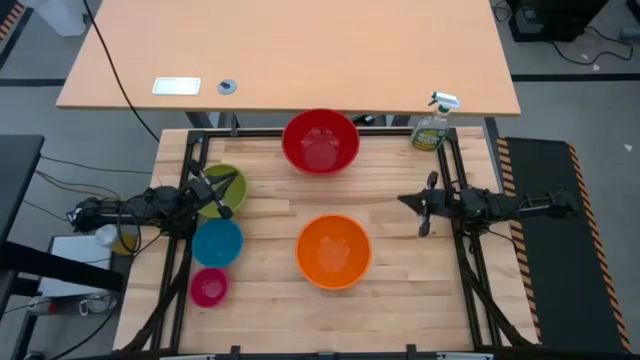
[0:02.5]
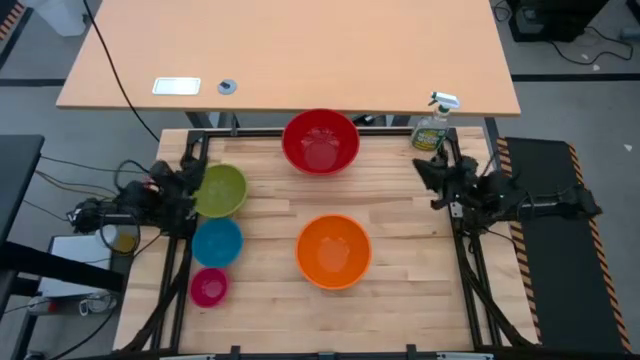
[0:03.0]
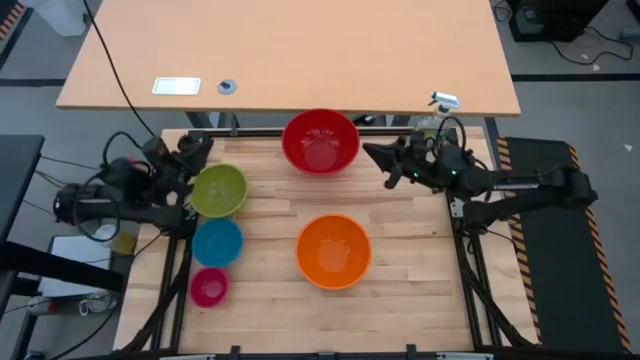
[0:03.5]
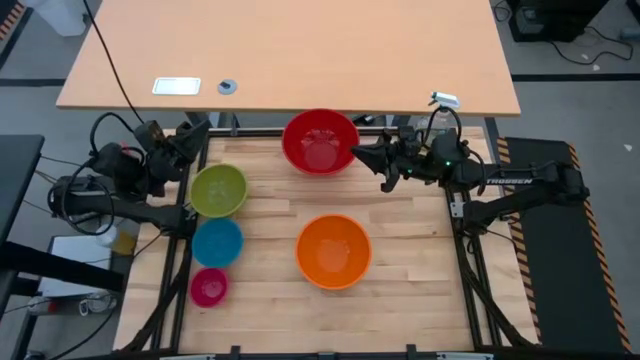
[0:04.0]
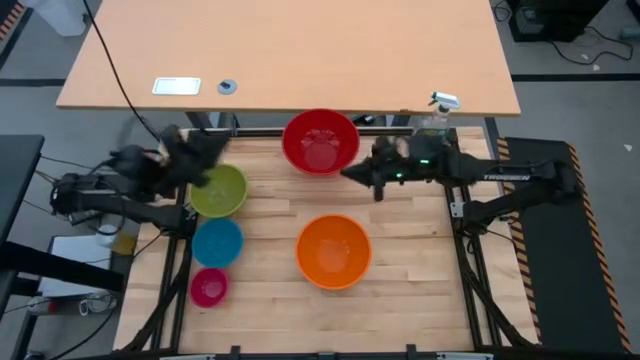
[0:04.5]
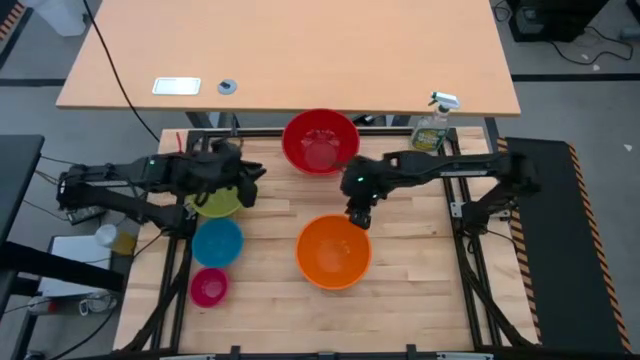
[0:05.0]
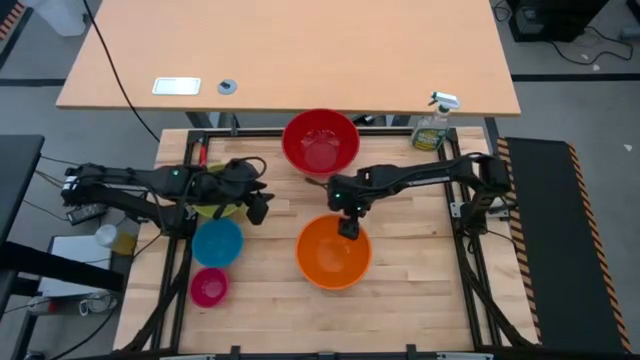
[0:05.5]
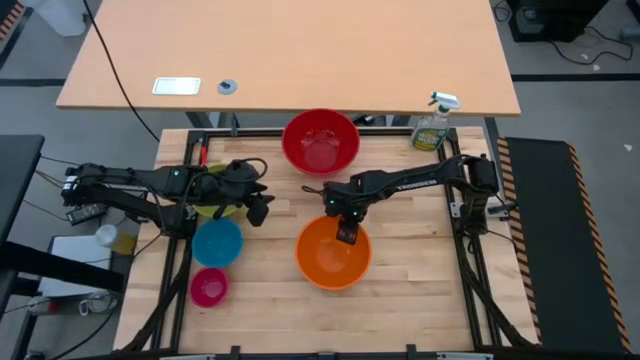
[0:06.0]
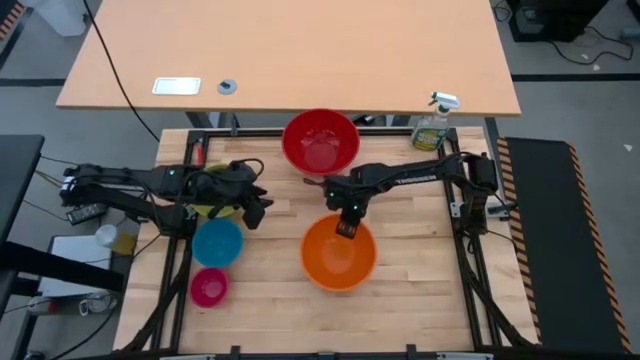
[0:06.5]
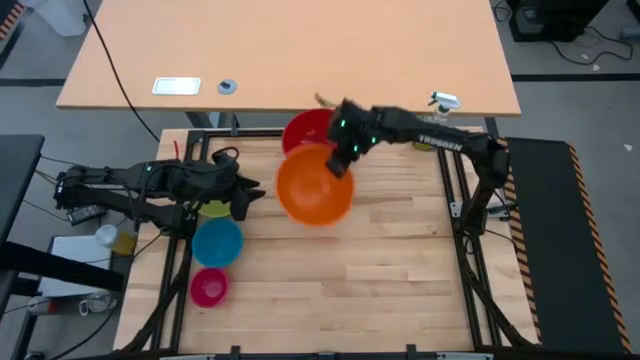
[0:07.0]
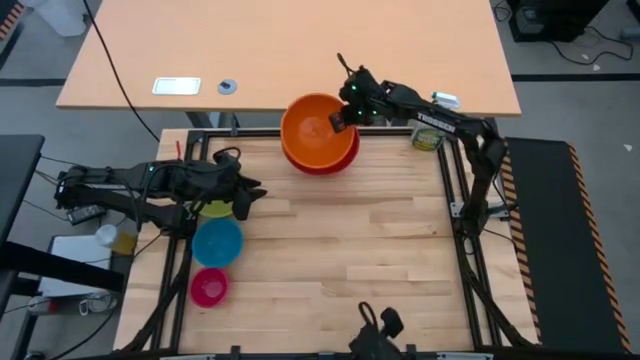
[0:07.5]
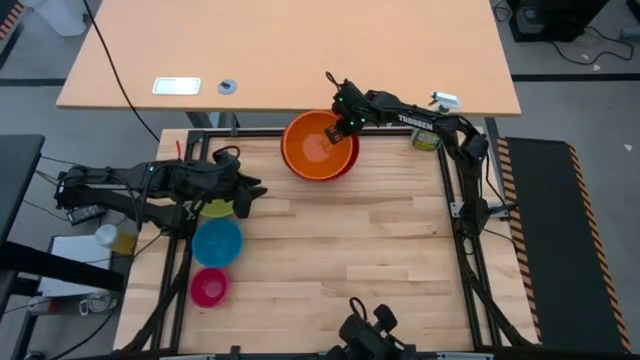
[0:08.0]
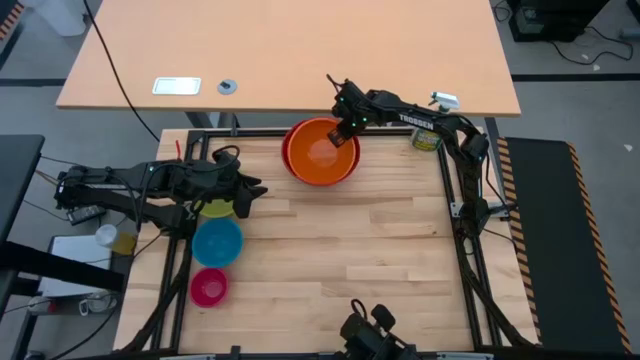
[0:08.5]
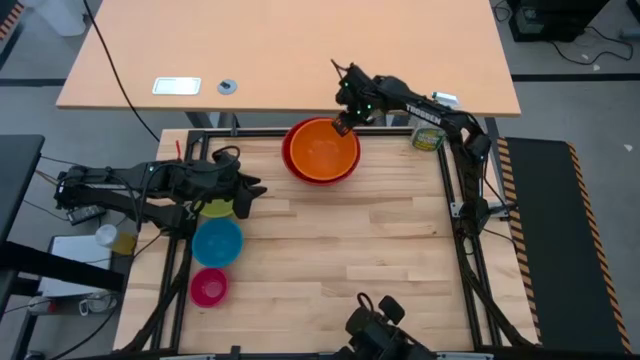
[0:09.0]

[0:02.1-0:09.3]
Stack the orange bowl on top of the red bowl

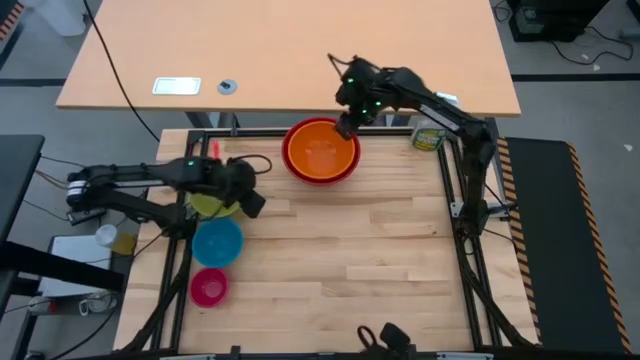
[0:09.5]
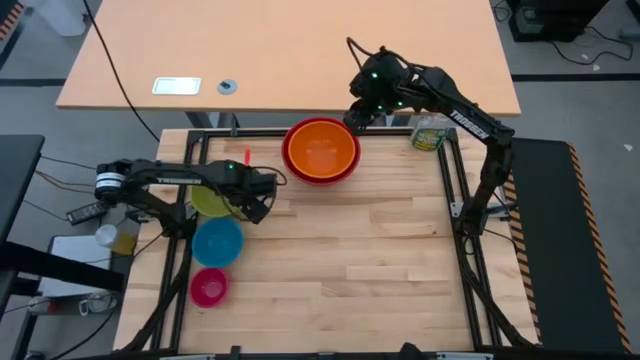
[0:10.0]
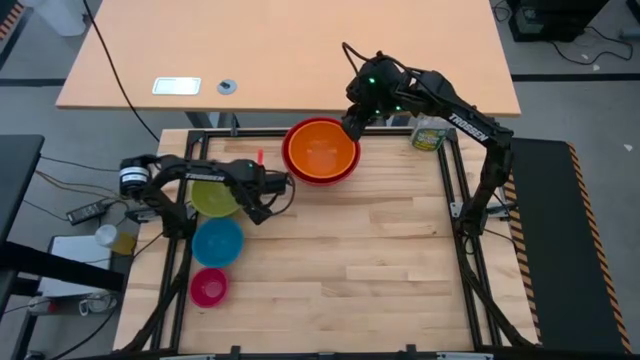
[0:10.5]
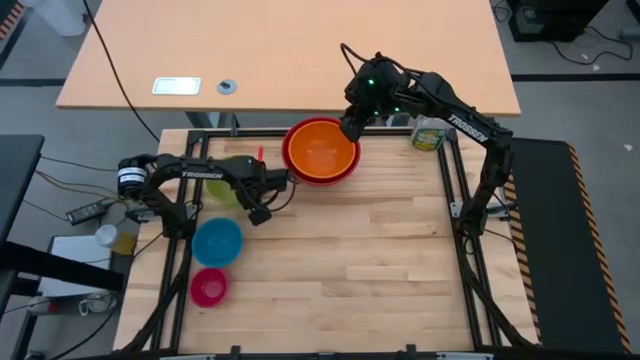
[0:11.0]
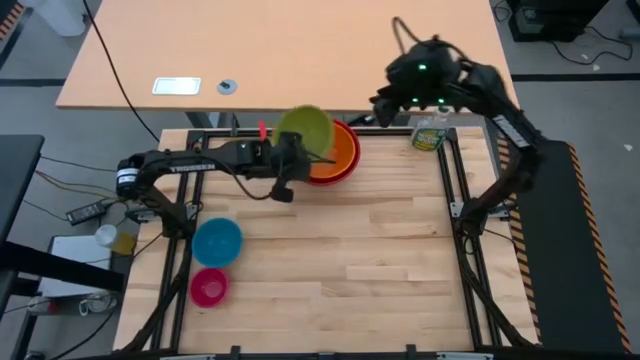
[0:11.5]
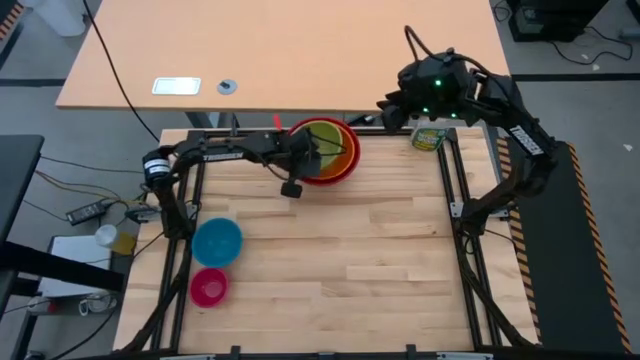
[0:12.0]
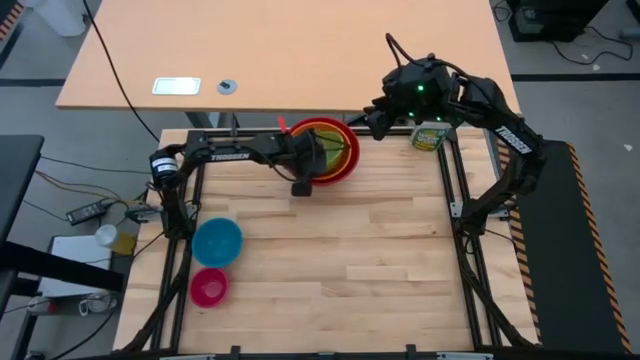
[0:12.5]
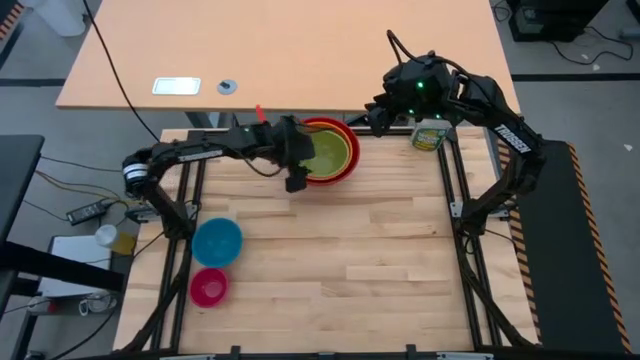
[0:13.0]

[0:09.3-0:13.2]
Stack the green bowl on top of the orange bowl

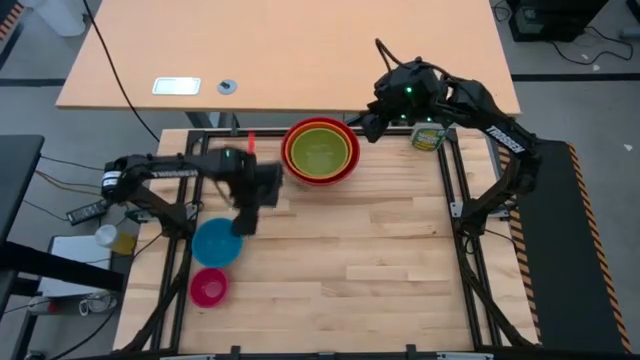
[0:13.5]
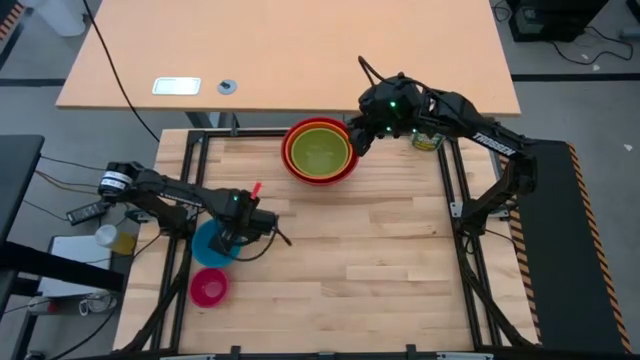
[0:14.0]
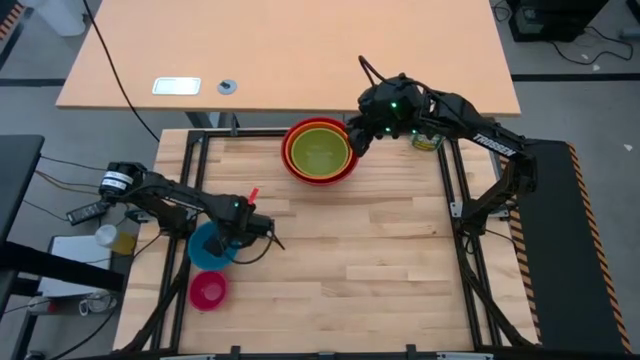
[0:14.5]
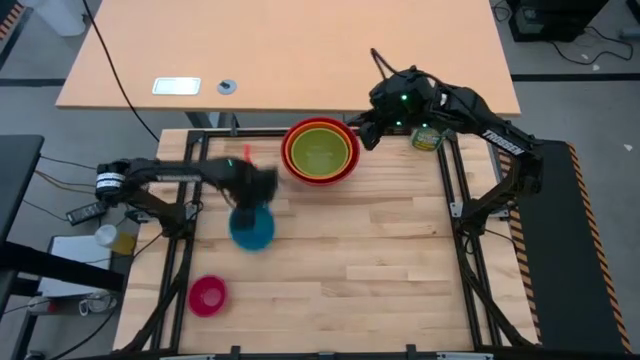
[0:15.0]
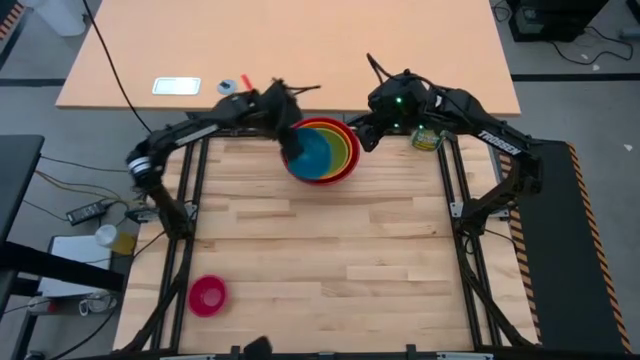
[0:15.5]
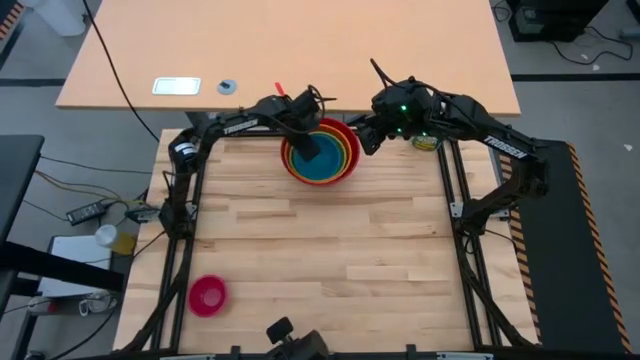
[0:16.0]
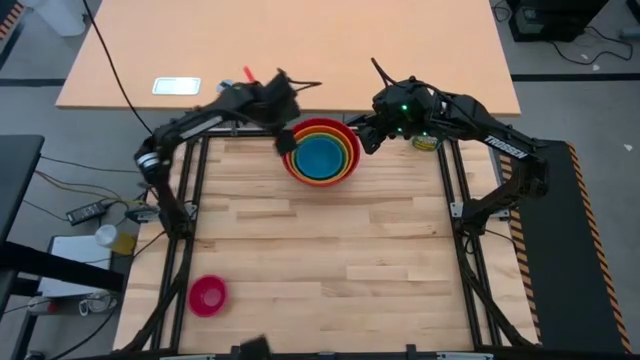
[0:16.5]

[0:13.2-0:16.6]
Stack the blue bowl on top of the green bowl

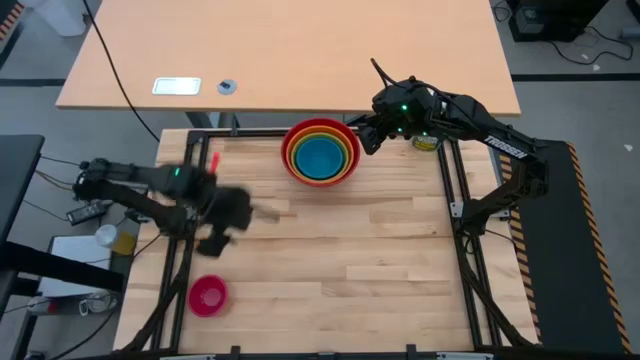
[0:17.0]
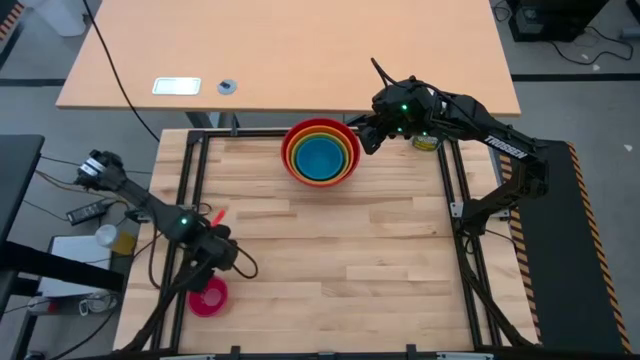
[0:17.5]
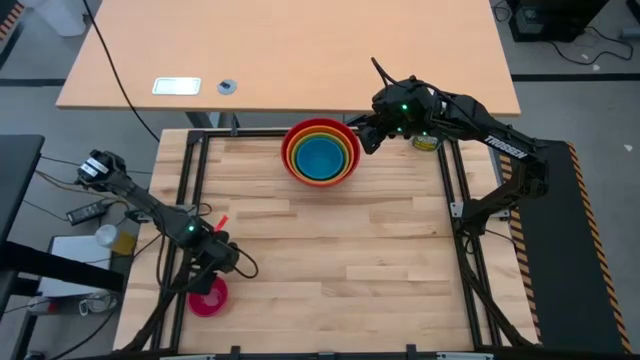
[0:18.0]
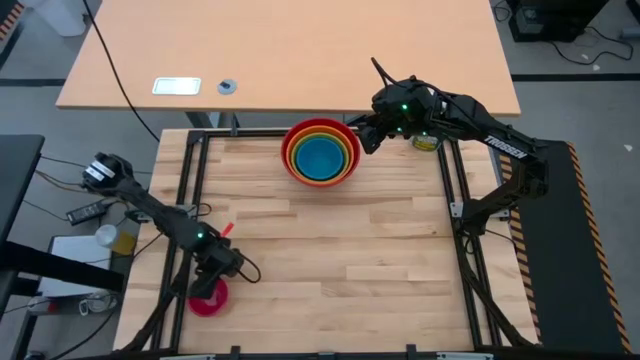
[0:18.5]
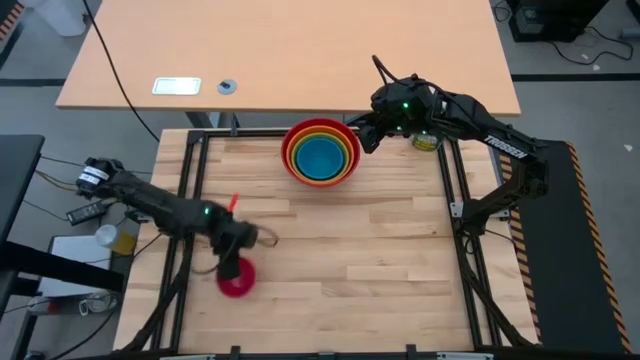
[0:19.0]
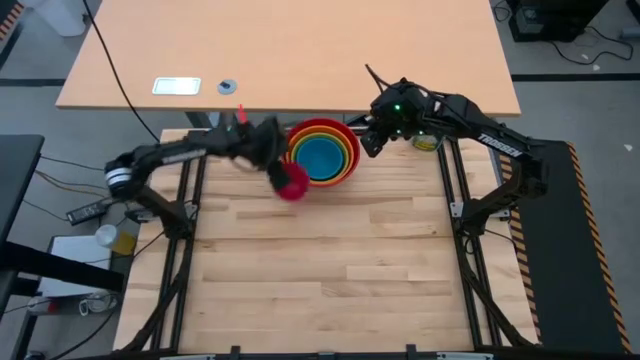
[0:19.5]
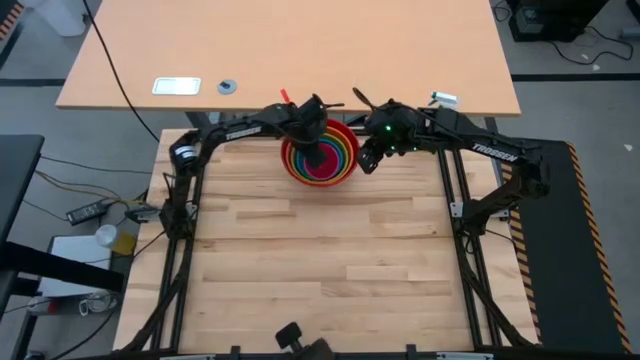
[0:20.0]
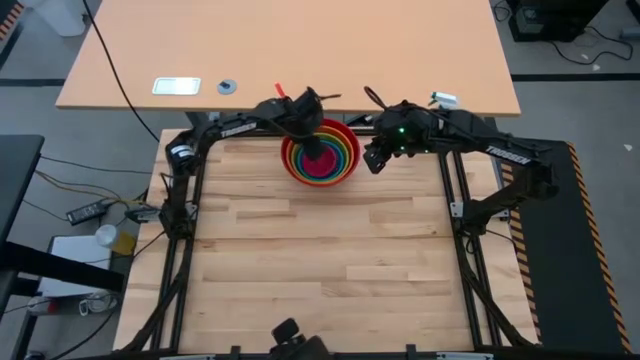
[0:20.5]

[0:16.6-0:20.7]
Stack the pink bowl on top of the blue bowl
